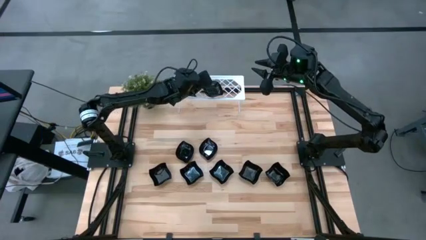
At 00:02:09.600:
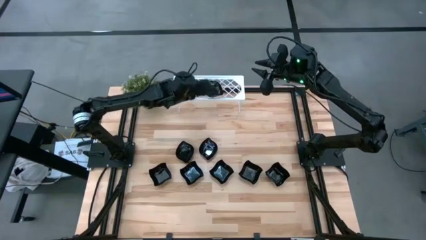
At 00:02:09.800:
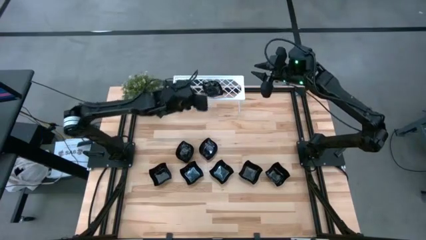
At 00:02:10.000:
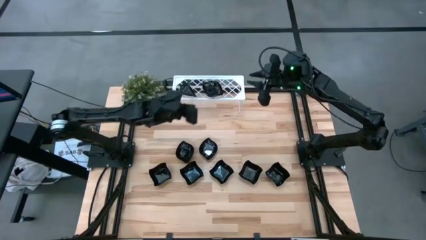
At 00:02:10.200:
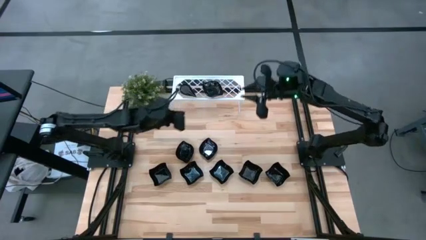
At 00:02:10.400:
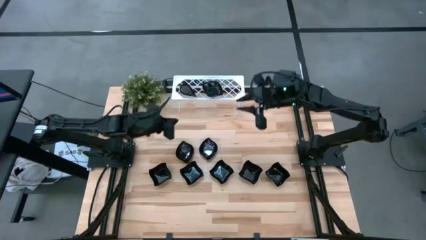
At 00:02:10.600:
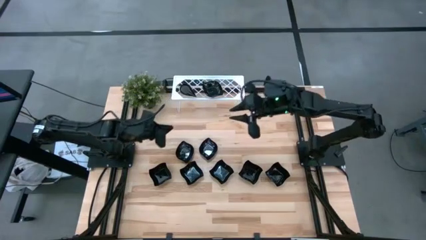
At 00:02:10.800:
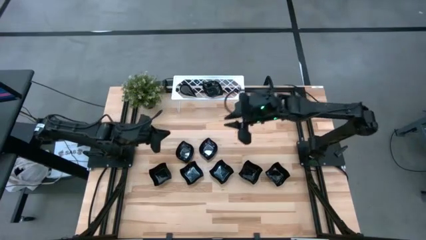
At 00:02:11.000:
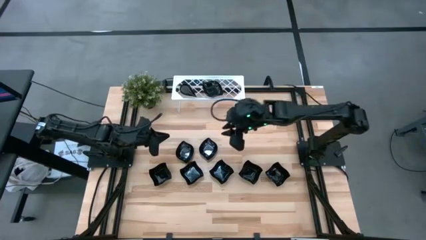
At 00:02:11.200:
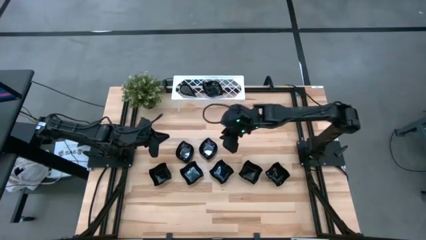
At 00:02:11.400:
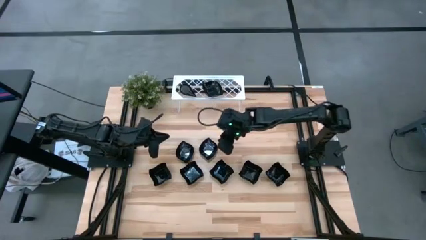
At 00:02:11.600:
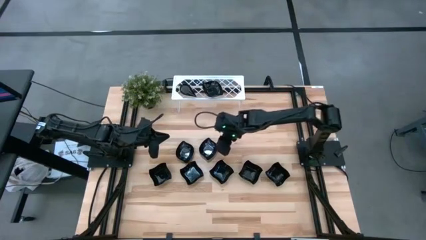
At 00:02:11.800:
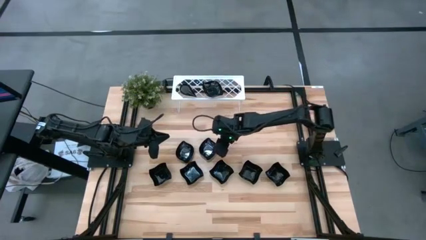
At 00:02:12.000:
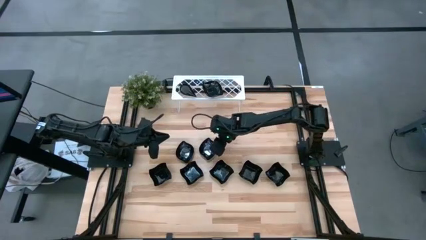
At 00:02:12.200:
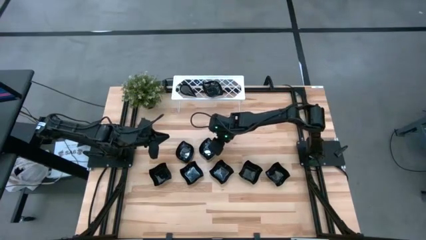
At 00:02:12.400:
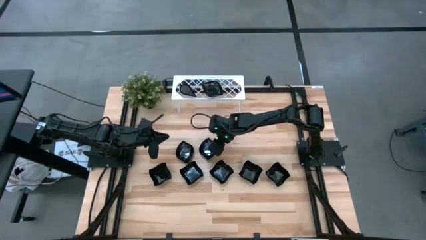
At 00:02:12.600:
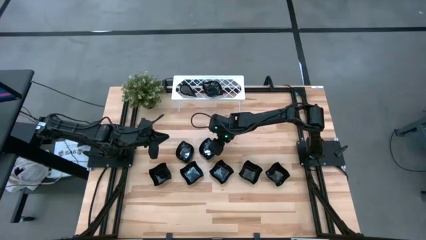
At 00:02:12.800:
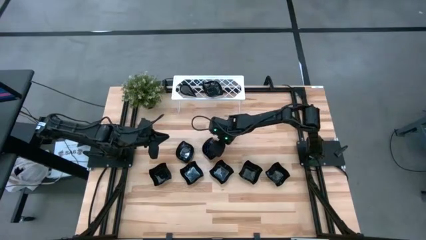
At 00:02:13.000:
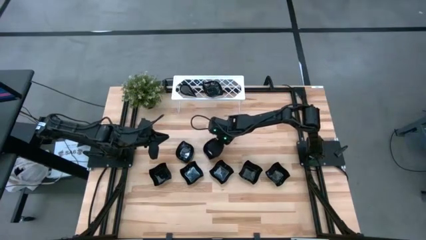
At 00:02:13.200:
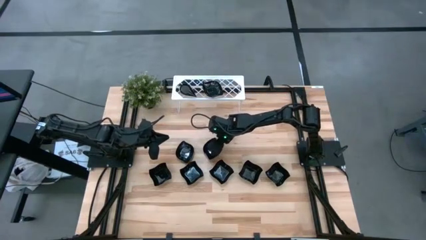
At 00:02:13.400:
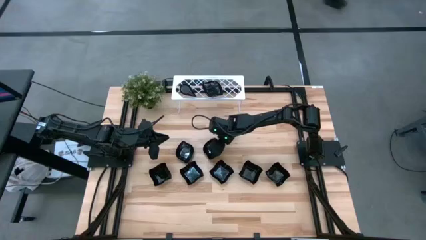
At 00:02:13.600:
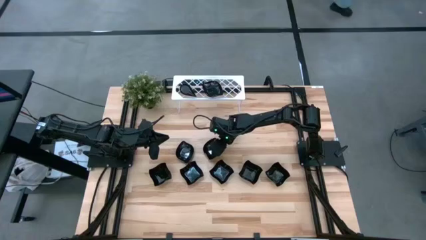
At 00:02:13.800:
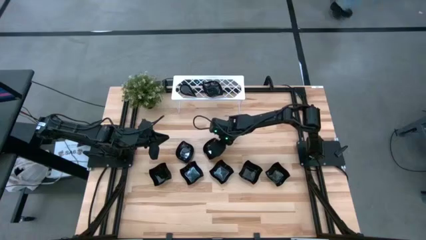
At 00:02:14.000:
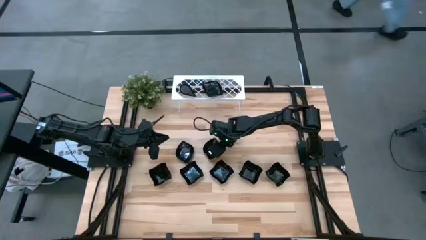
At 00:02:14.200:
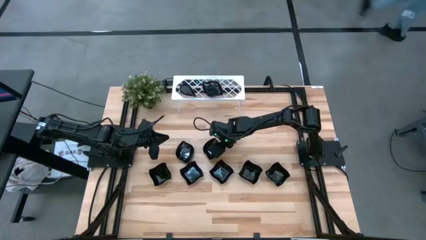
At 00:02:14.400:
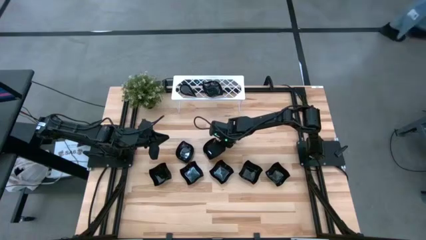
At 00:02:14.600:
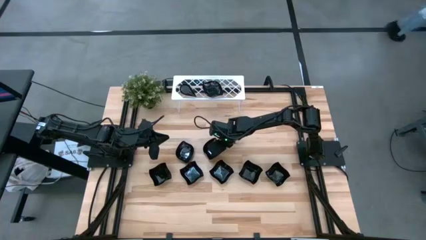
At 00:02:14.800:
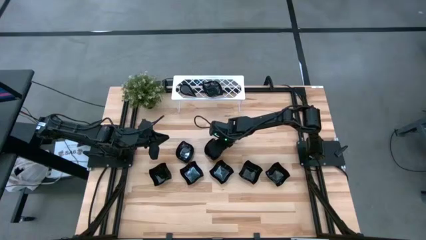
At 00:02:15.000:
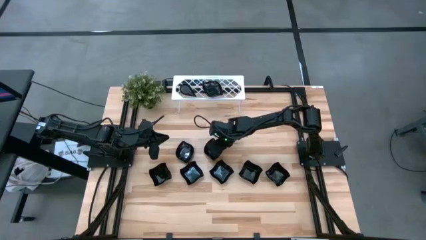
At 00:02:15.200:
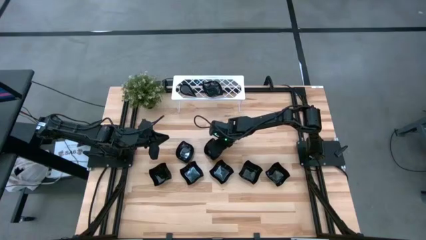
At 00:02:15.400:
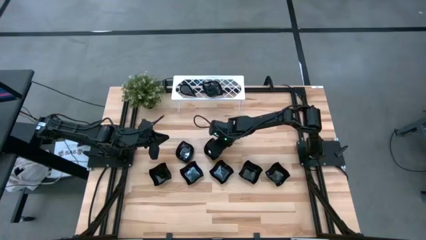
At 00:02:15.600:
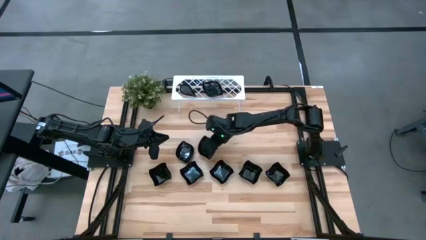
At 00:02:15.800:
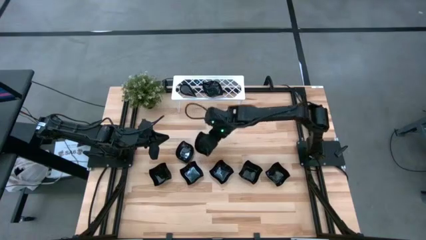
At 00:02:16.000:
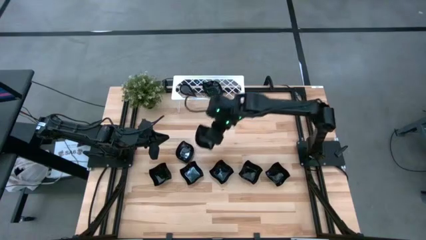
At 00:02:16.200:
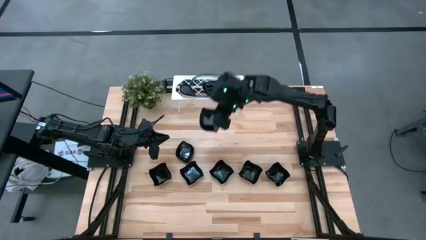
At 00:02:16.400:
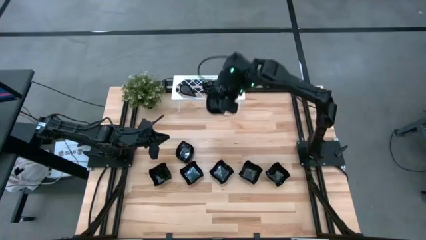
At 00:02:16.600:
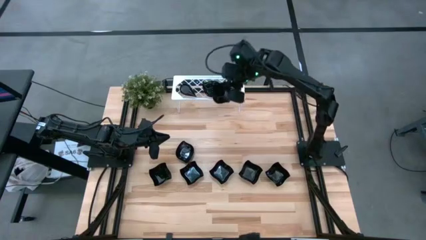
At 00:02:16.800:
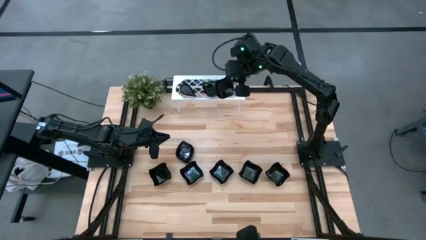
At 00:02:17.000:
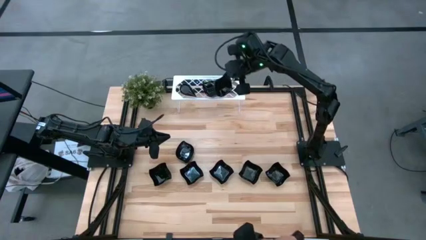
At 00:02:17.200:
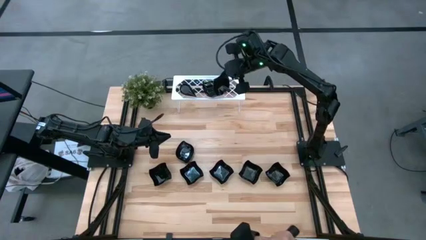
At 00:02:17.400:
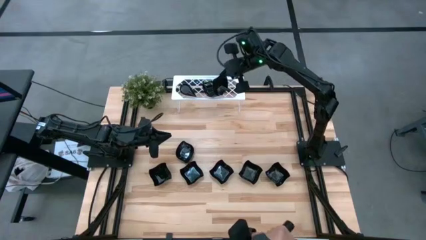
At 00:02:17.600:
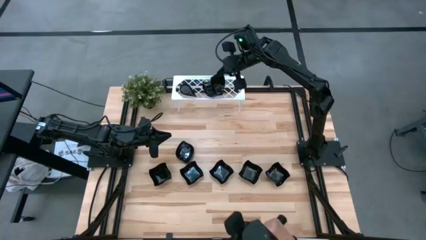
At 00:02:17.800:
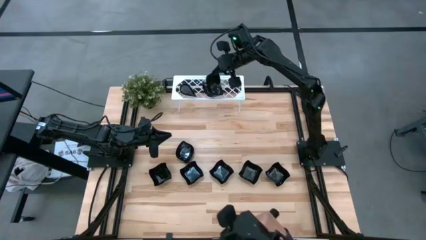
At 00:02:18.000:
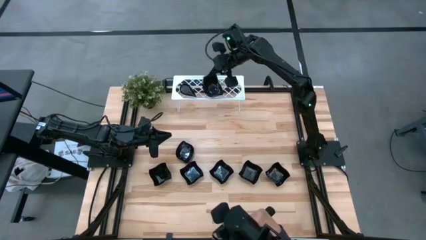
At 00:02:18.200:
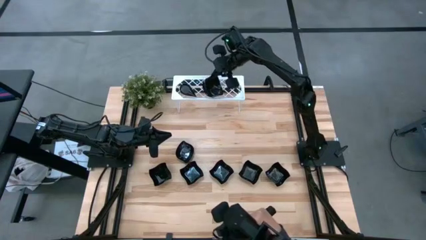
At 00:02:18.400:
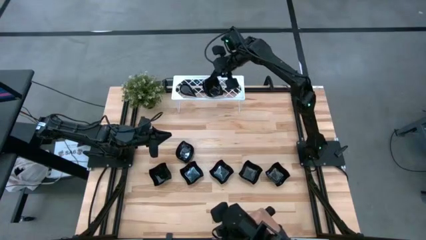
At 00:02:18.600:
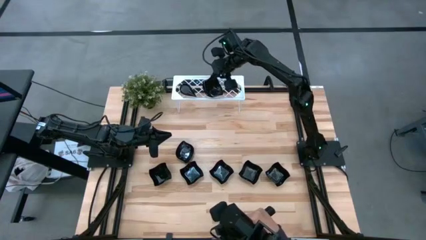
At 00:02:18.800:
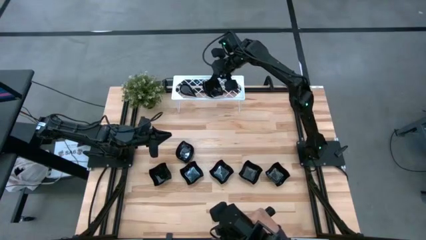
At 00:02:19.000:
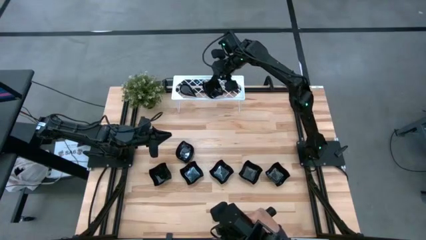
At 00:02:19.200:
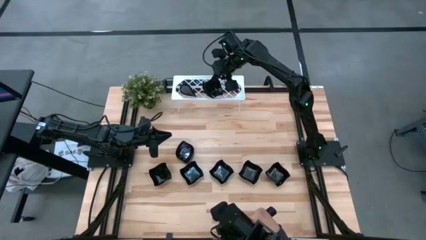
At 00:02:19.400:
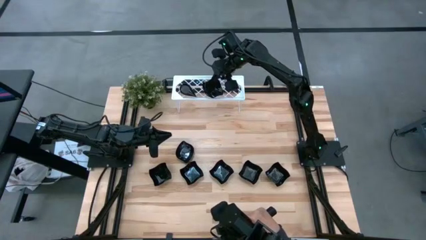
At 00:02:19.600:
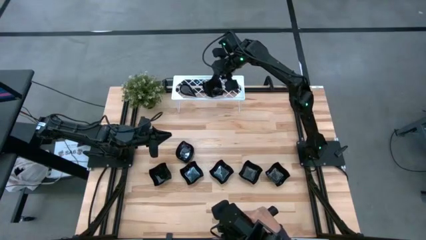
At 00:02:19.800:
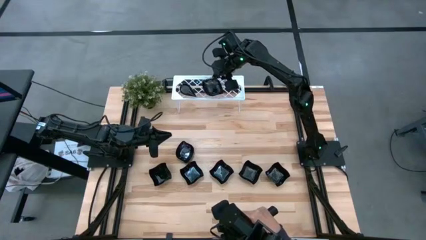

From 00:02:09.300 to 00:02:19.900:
Task: Pick & Place Mini shaped plates
Stack the black leaf shaped plate on top of the black leaf shaped plate on the shelf
